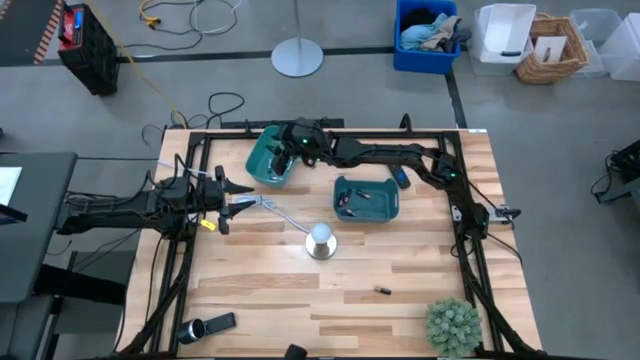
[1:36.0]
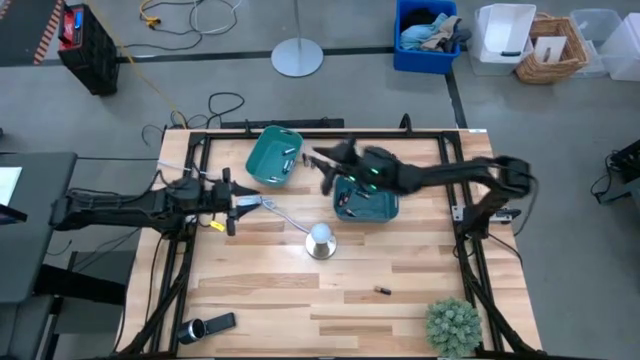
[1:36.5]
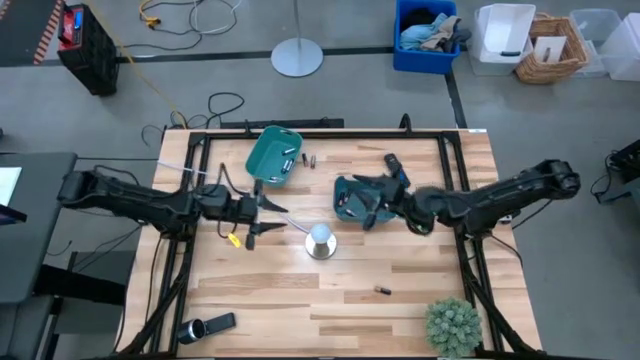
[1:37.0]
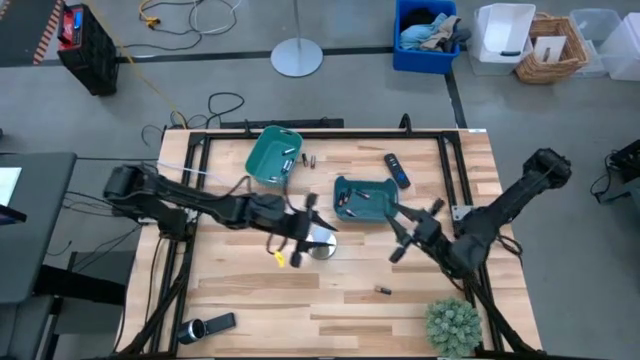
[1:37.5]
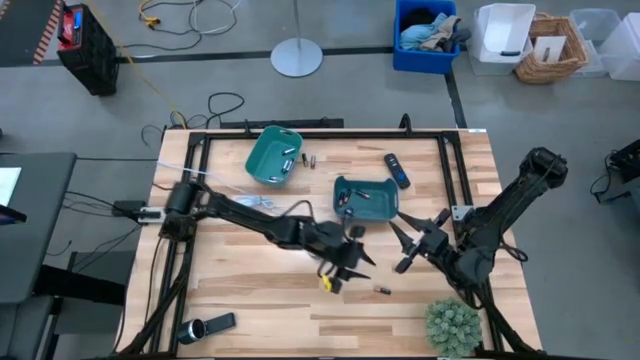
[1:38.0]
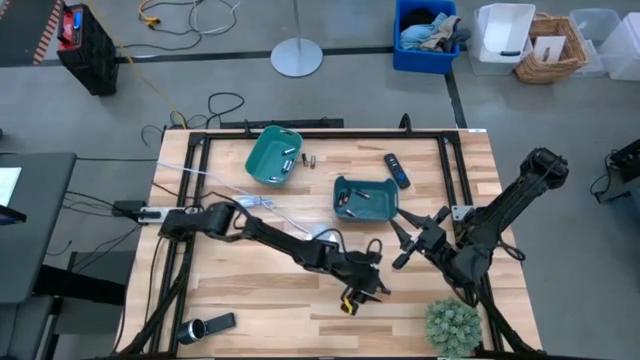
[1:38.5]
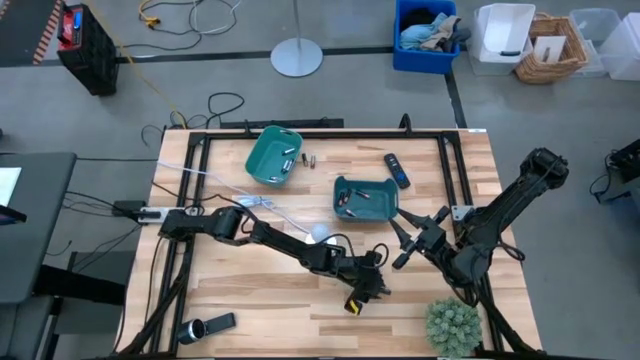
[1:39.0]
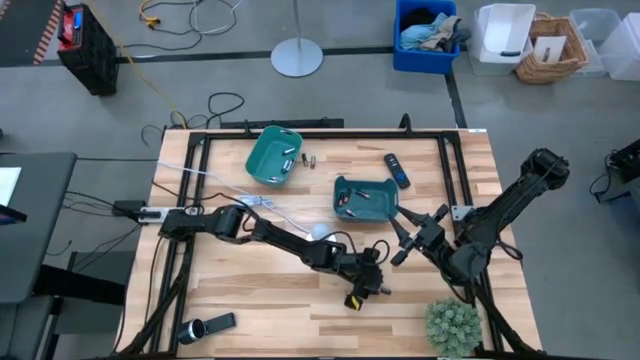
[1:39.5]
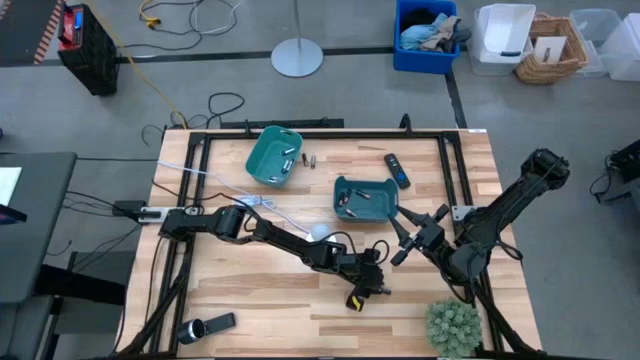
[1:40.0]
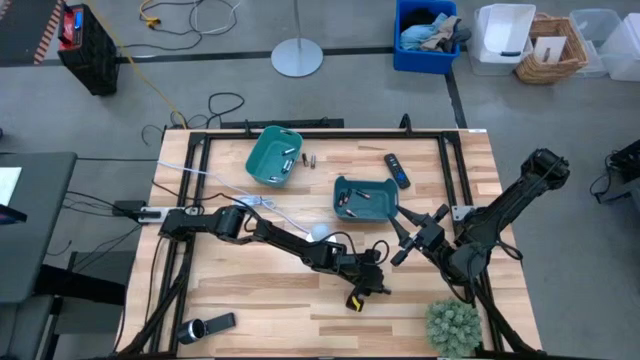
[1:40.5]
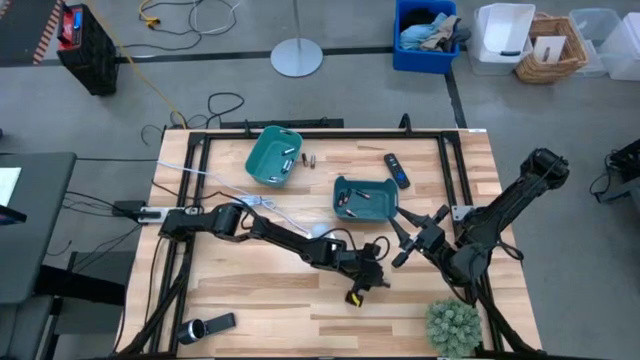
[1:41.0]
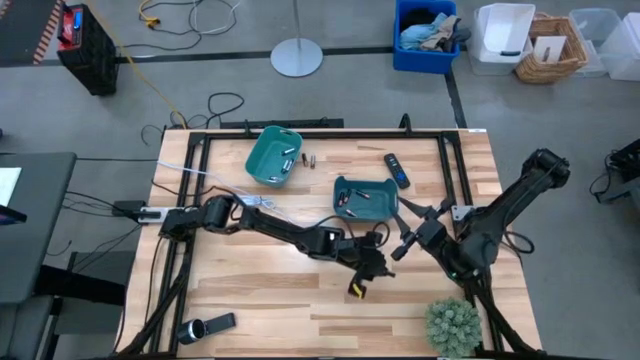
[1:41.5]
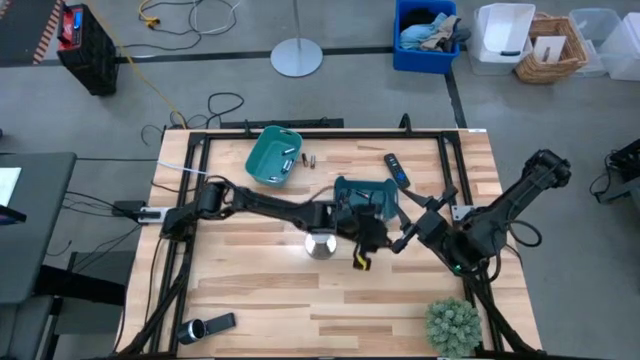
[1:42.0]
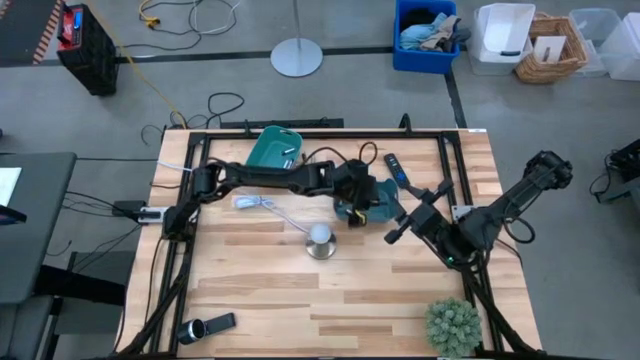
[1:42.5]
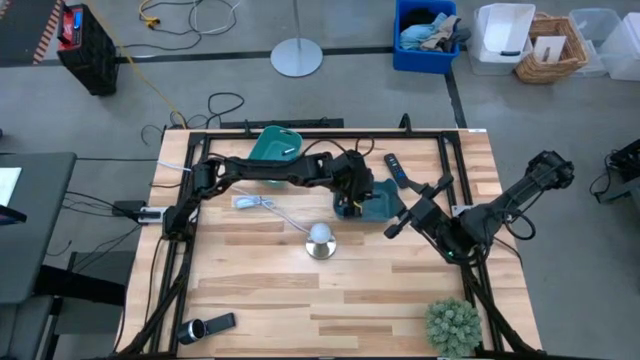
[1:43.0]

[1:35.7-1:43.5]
Task: Sort batteries
Put the black battery into the blue bin

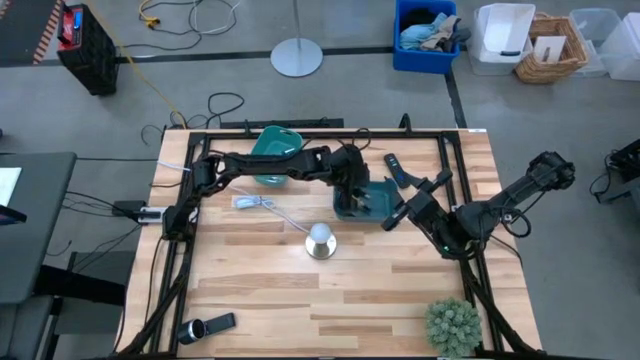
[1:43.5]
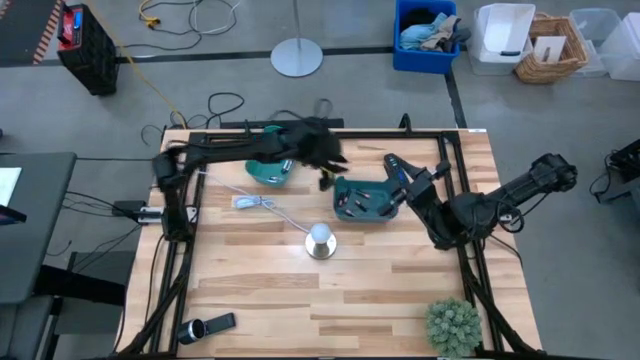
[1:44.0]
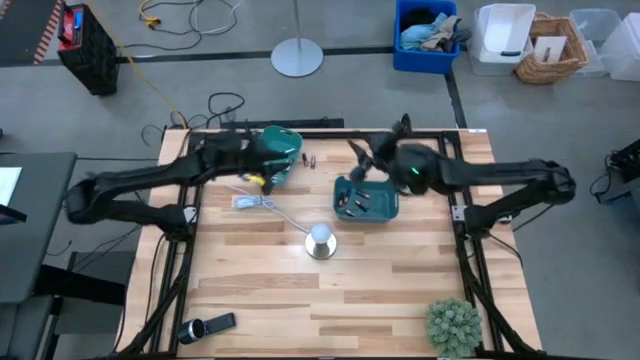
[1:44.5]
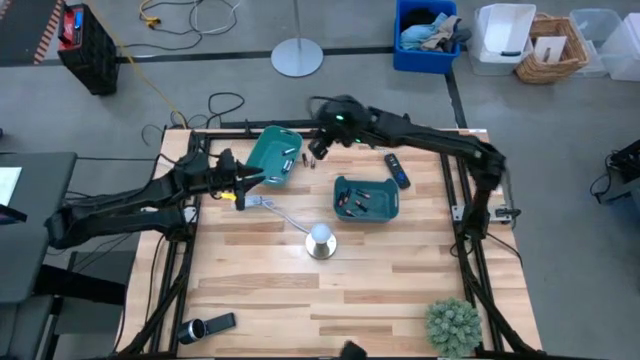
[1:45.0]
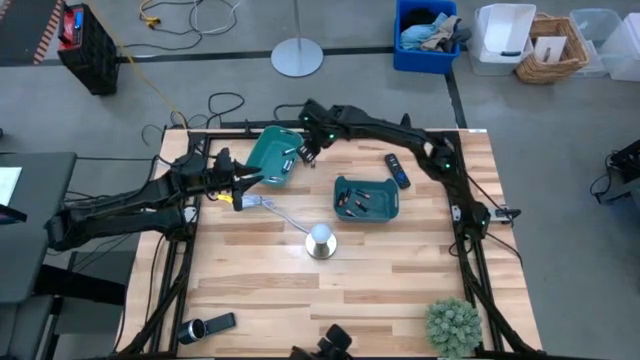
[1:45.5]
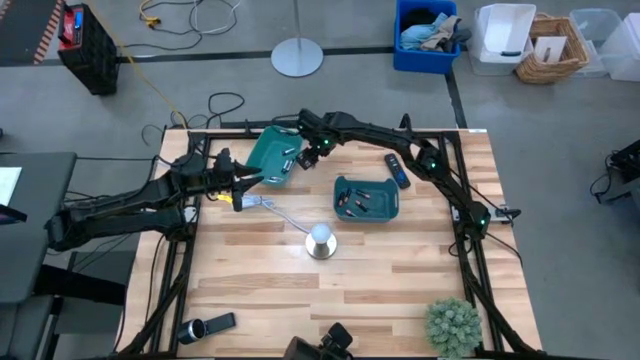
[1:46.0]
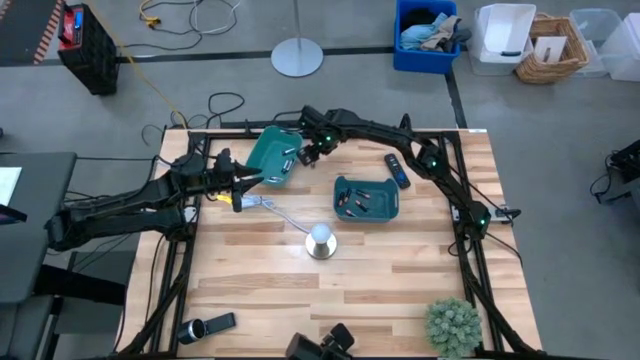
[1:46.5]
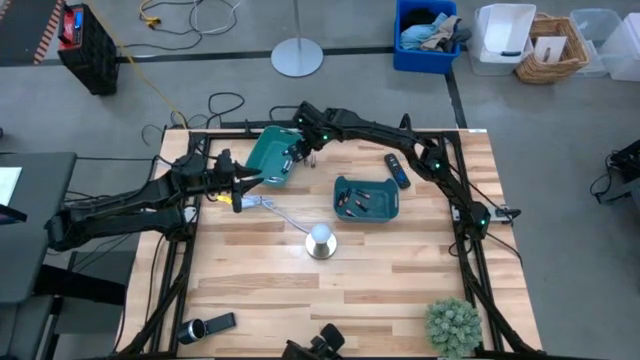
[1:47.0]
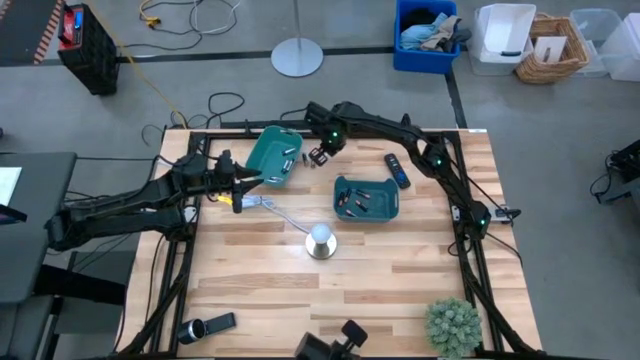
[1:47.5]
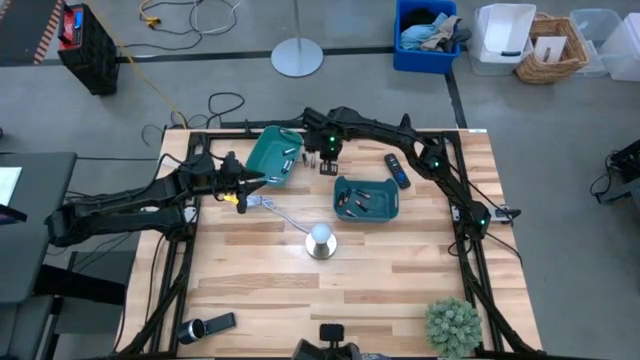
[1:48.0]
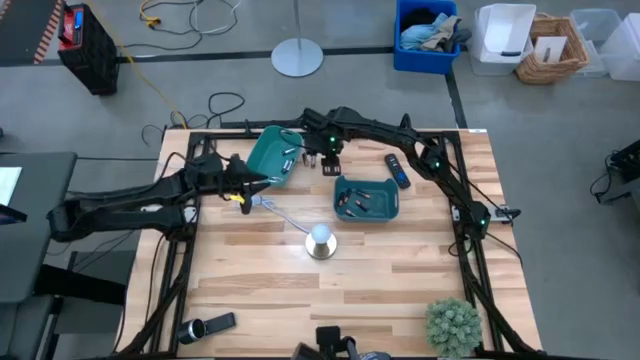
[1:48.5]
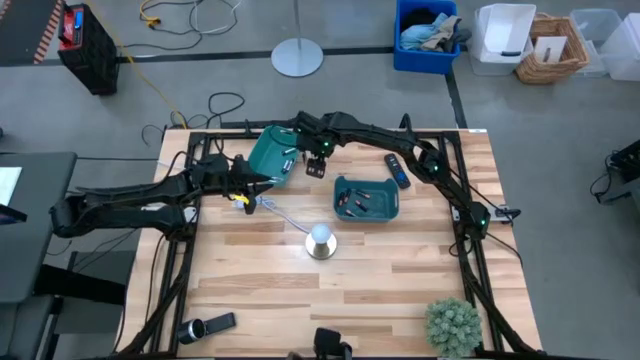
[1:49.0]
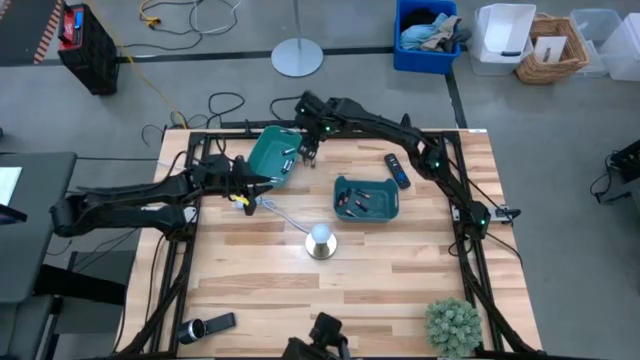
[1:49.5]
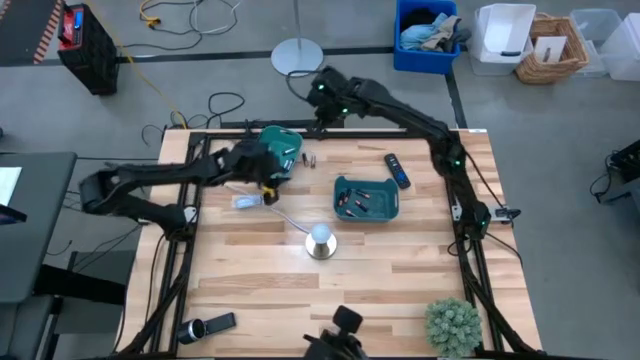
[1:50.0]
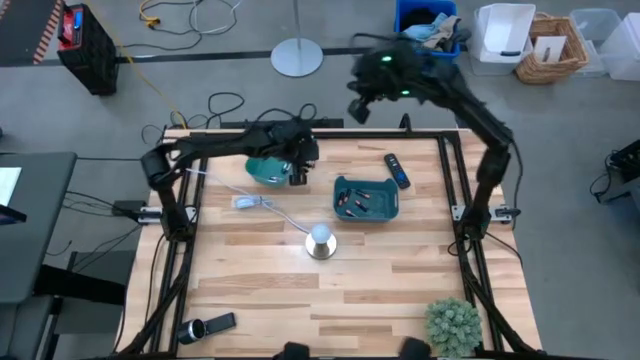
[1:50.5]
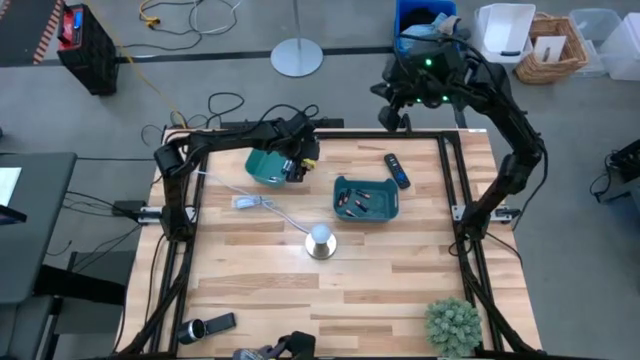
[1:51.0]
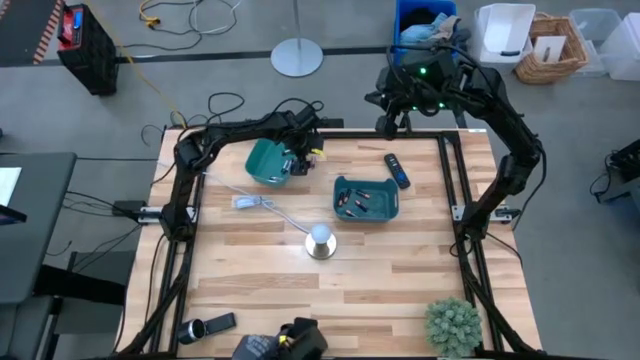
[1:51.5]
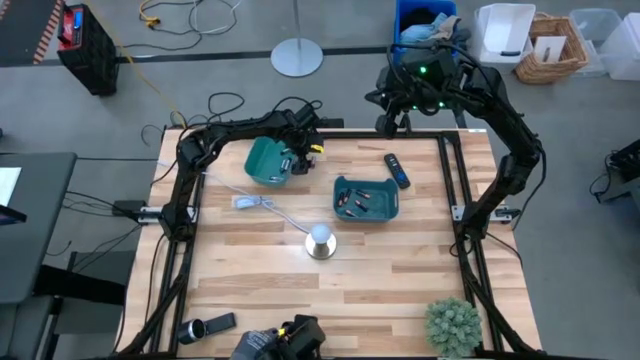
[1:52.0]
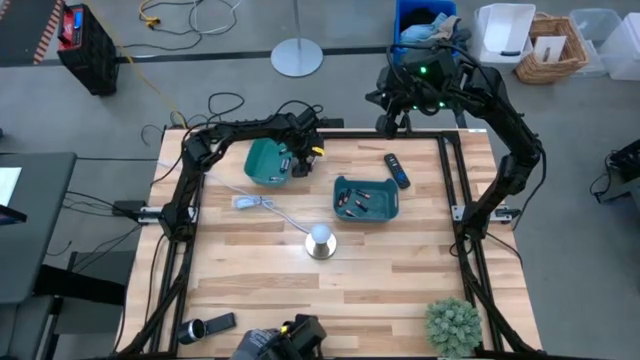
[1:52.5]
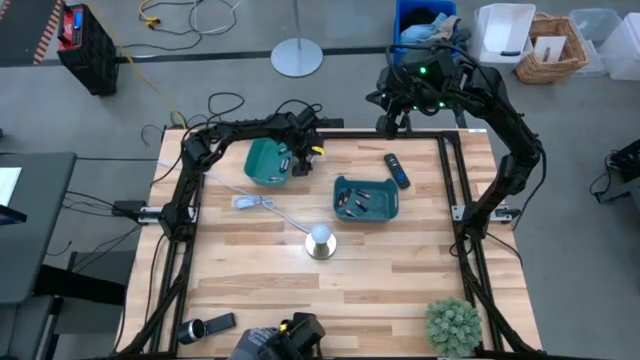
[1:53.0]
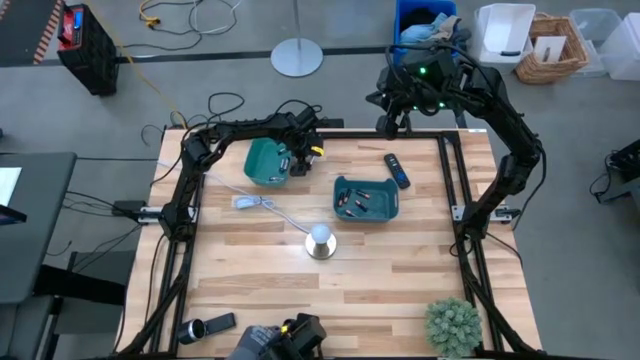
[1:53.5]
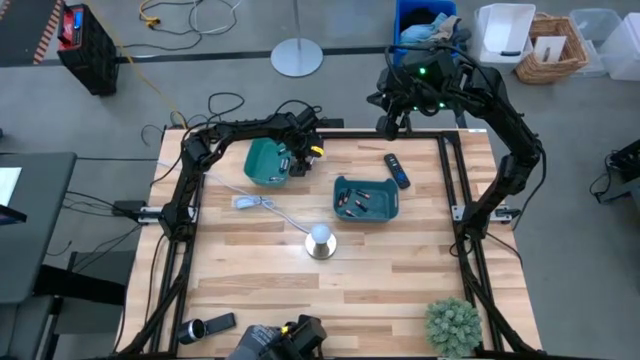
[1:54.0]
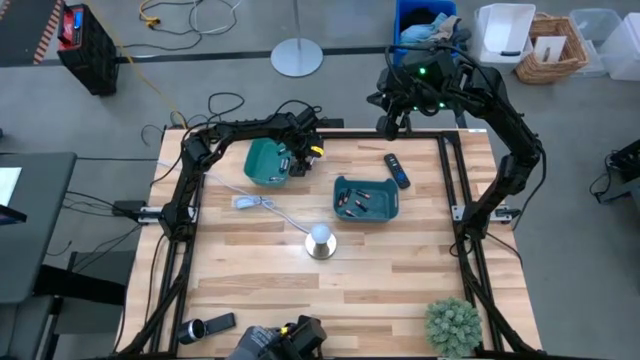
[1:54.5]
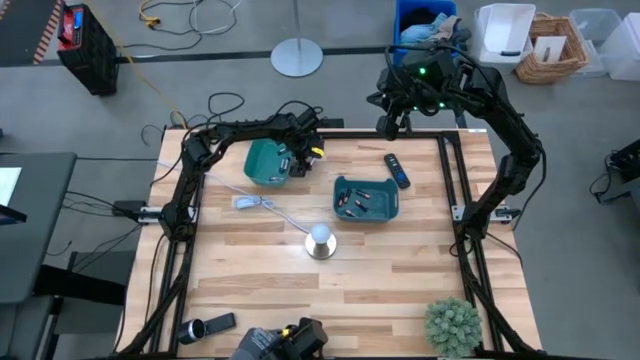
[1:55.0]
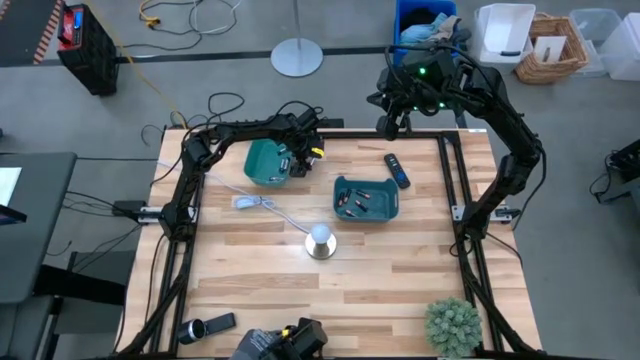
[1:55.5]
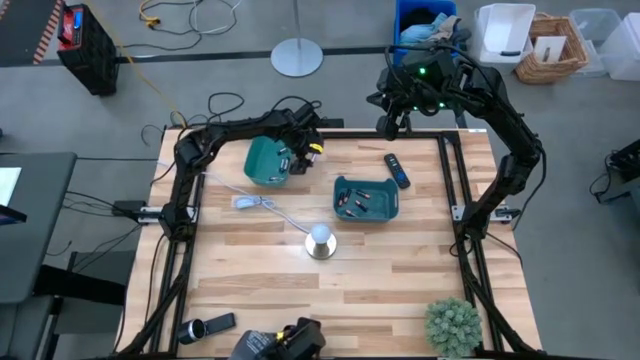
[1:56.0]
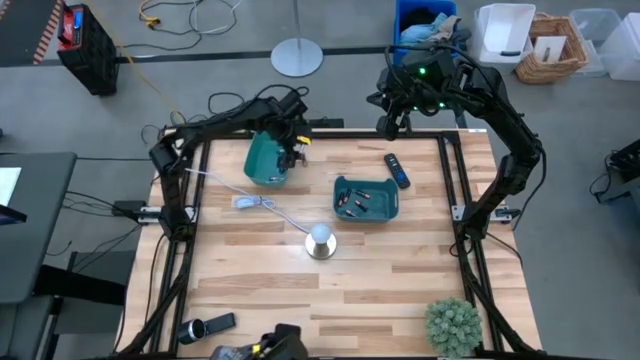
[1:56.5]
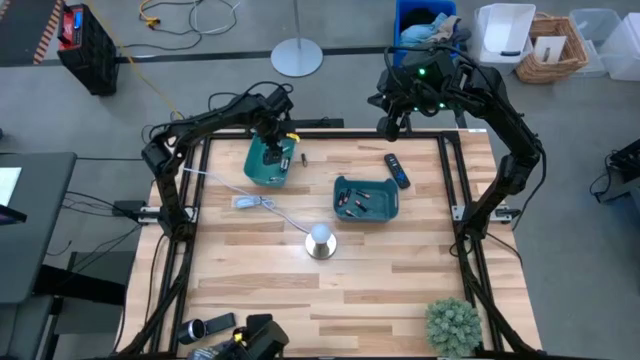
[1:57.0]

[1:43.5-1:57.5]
Put the silver battery into the green bin
